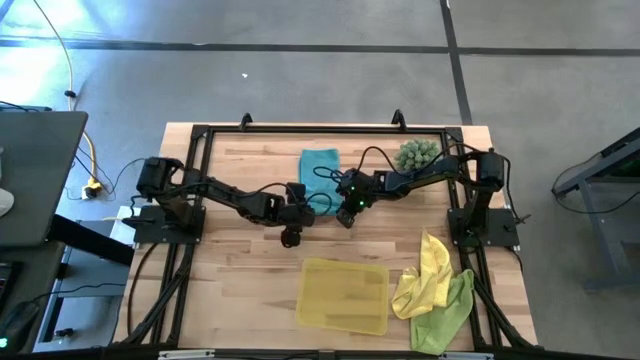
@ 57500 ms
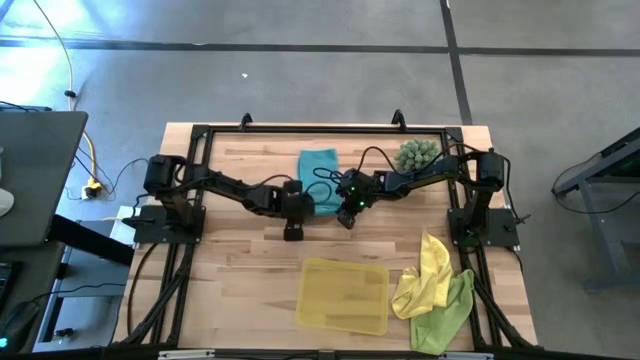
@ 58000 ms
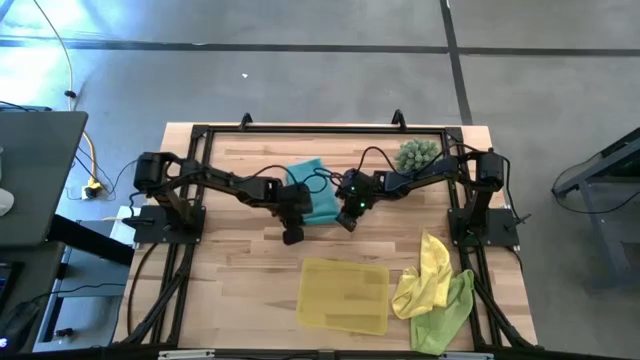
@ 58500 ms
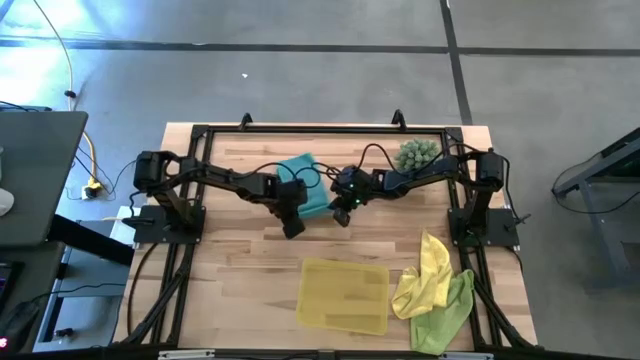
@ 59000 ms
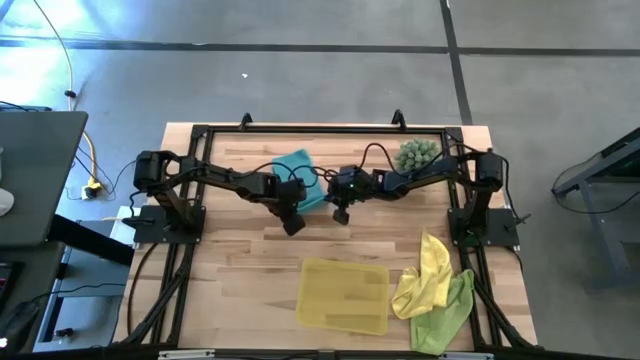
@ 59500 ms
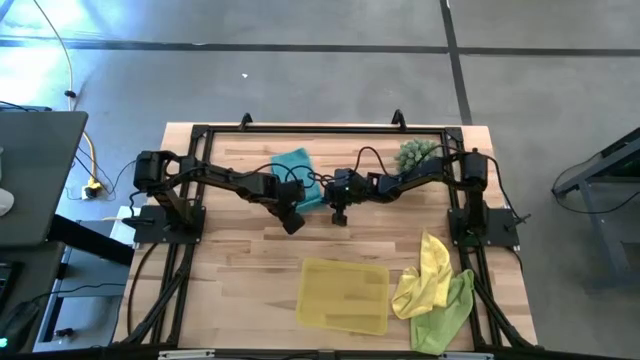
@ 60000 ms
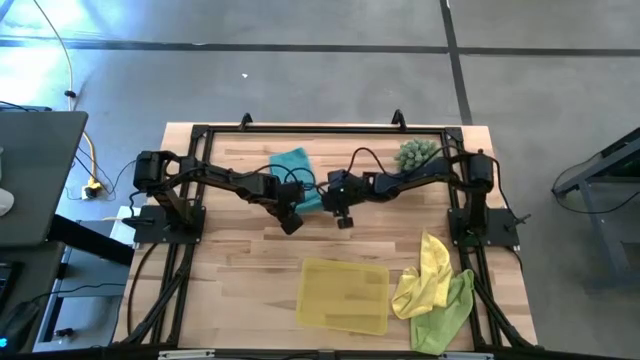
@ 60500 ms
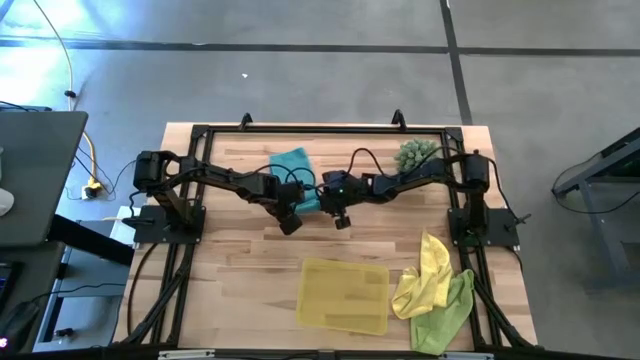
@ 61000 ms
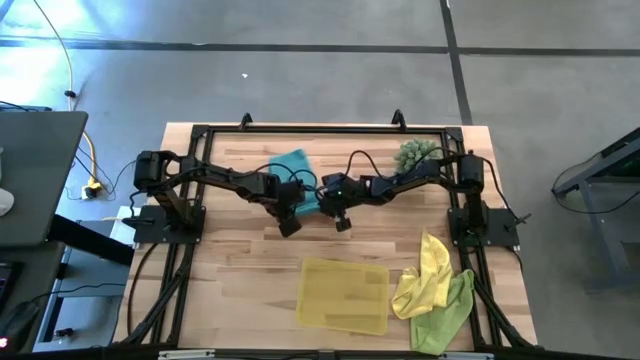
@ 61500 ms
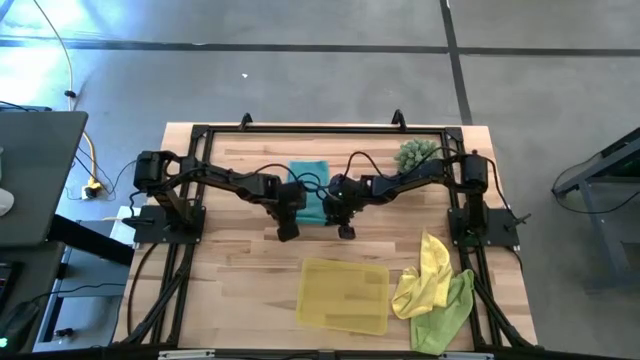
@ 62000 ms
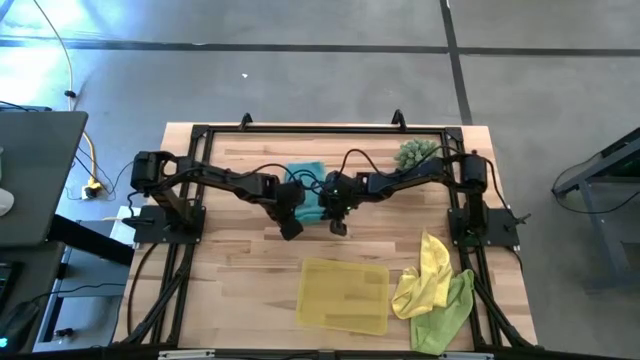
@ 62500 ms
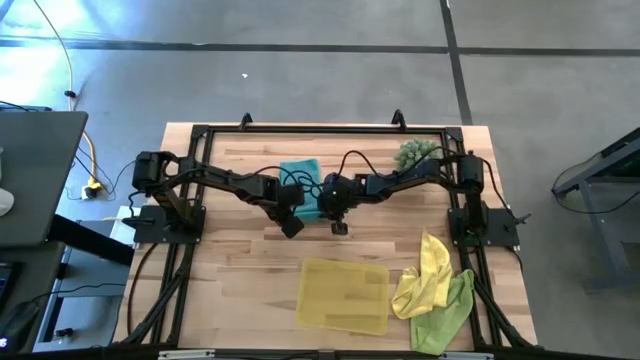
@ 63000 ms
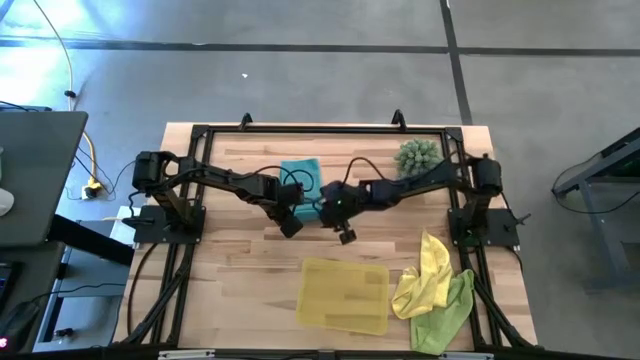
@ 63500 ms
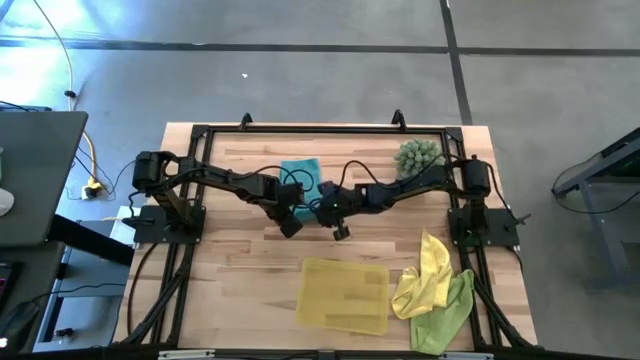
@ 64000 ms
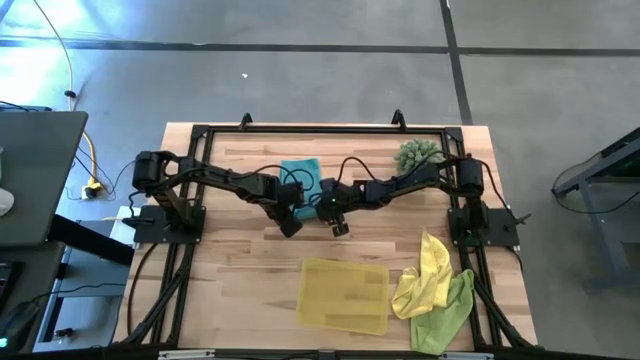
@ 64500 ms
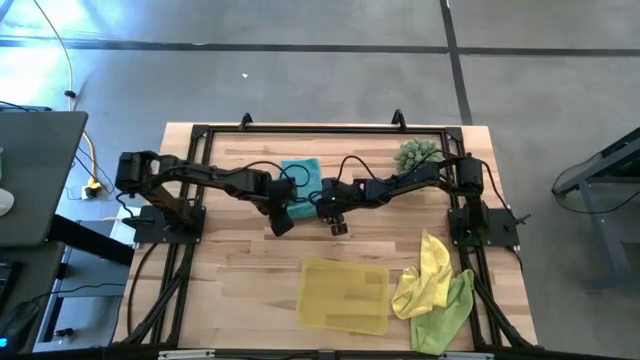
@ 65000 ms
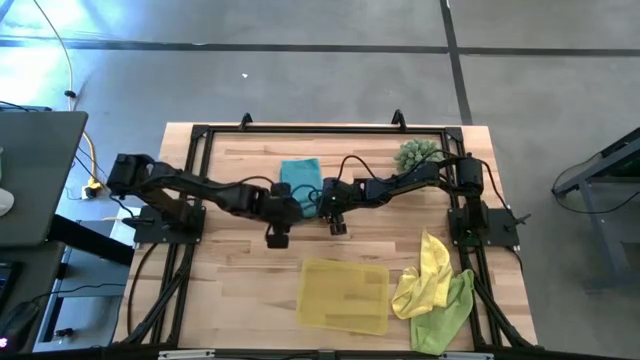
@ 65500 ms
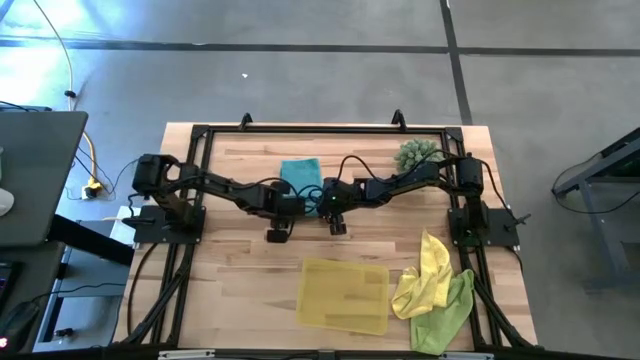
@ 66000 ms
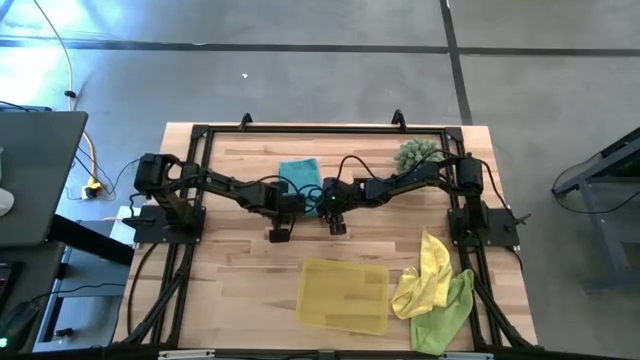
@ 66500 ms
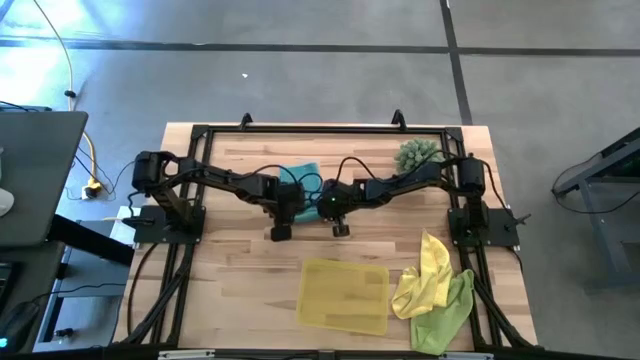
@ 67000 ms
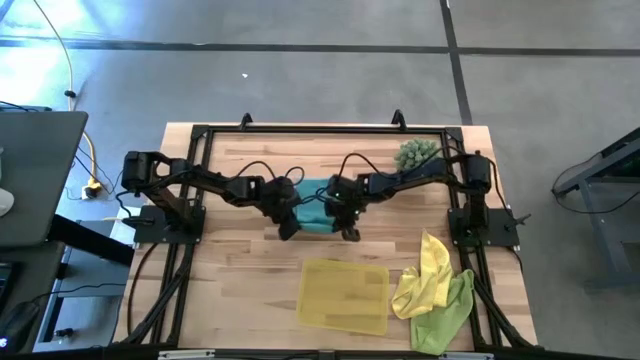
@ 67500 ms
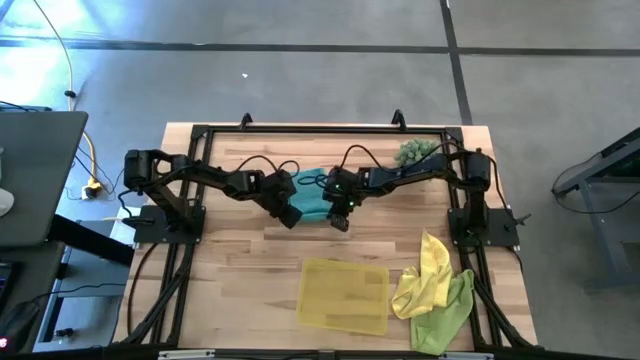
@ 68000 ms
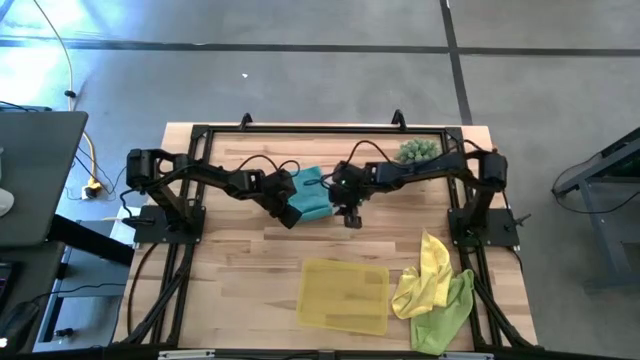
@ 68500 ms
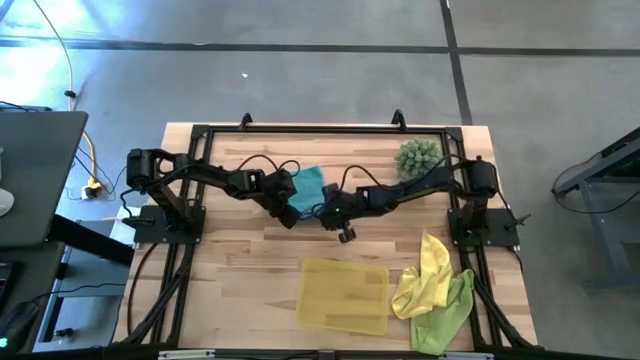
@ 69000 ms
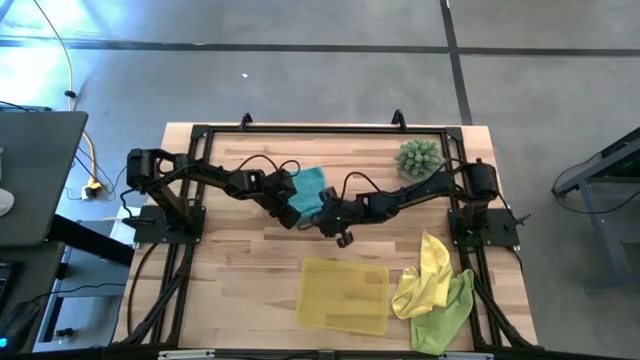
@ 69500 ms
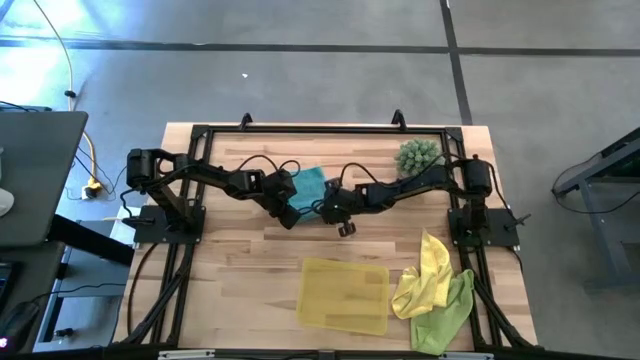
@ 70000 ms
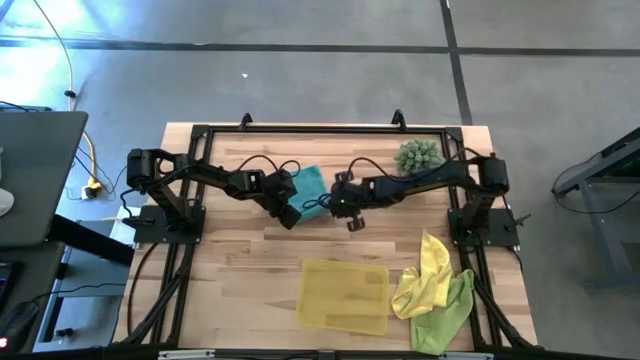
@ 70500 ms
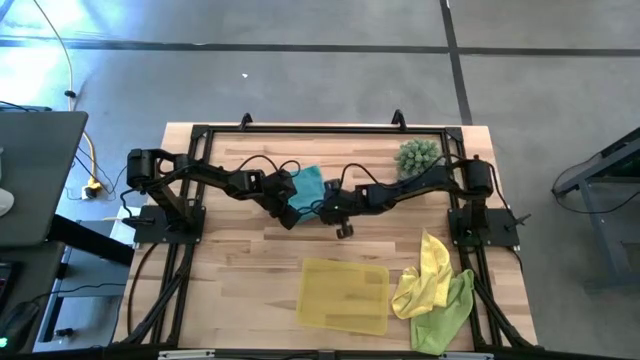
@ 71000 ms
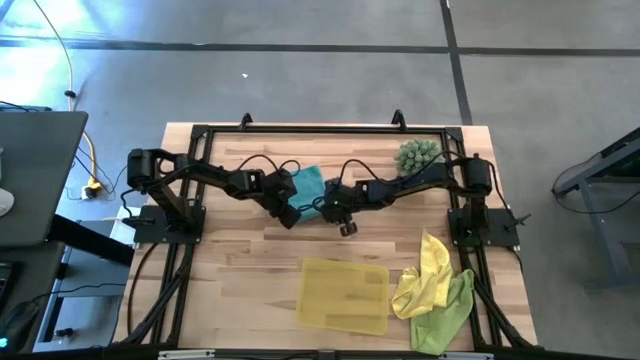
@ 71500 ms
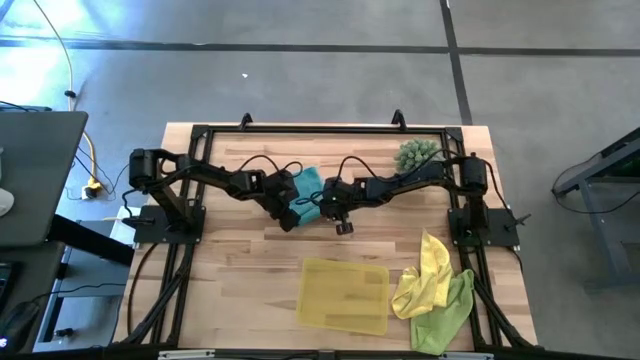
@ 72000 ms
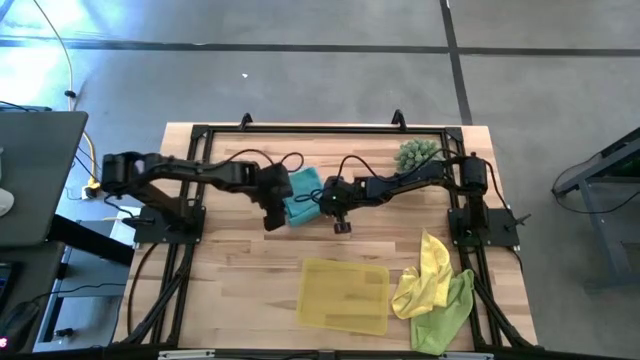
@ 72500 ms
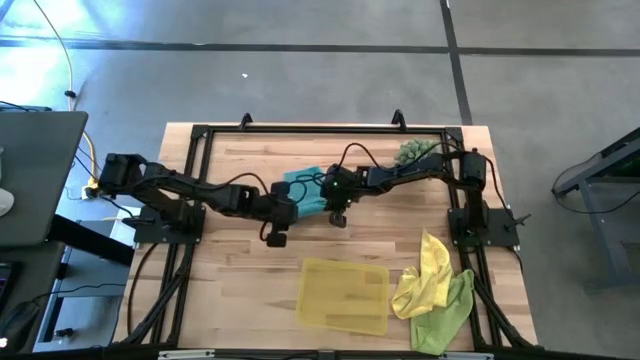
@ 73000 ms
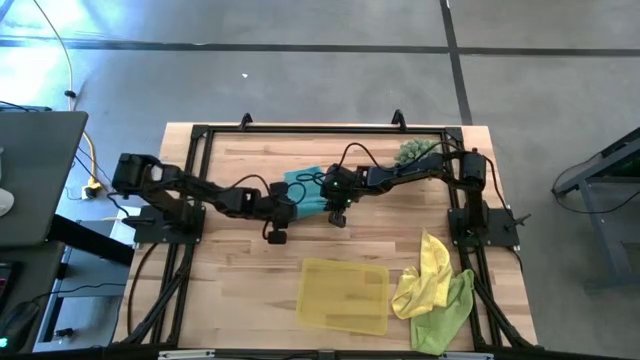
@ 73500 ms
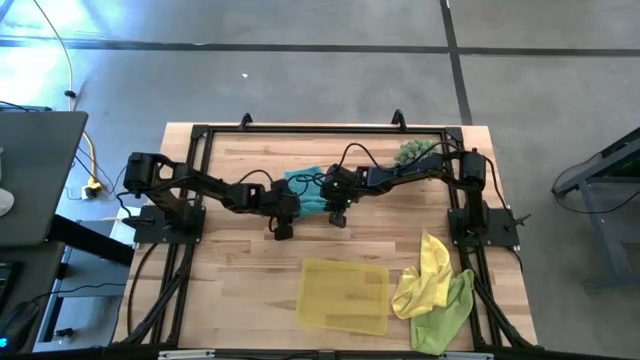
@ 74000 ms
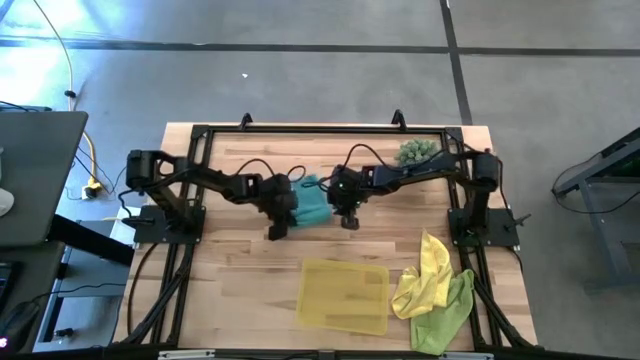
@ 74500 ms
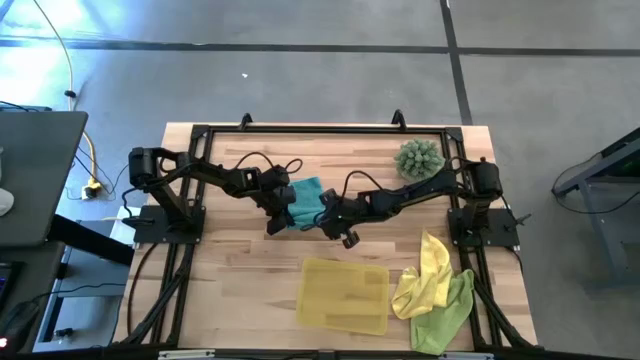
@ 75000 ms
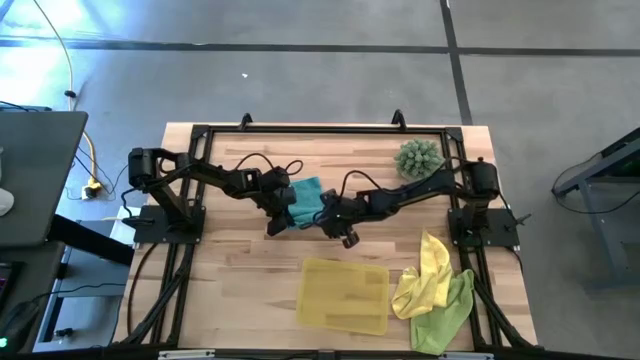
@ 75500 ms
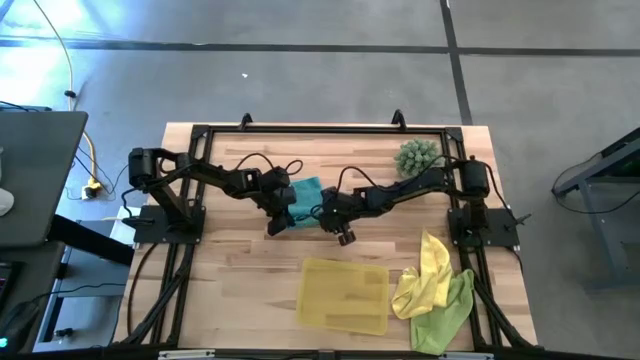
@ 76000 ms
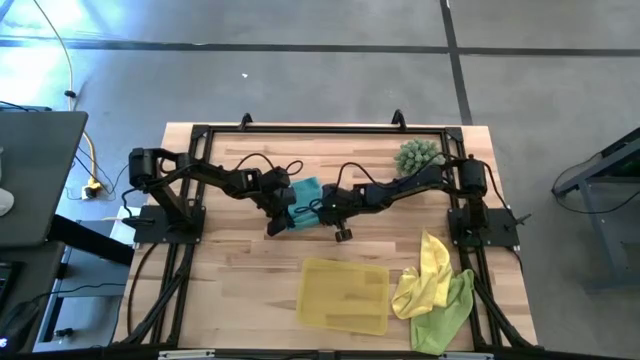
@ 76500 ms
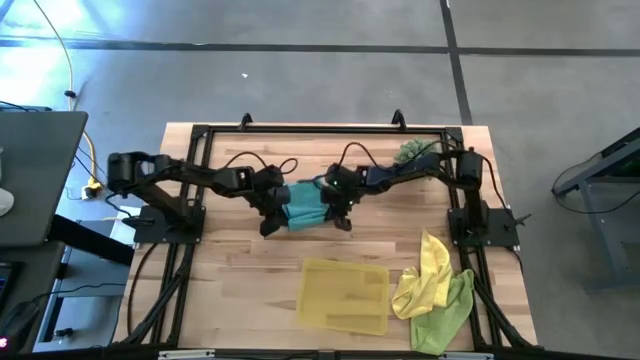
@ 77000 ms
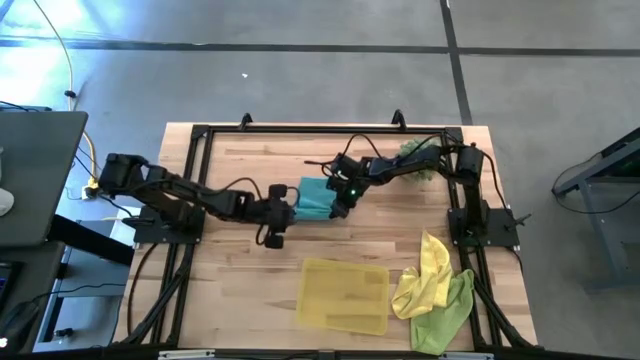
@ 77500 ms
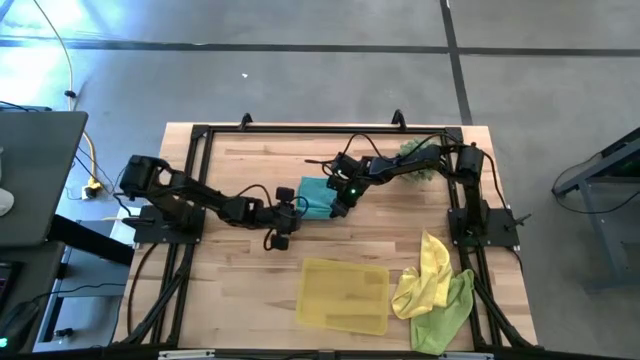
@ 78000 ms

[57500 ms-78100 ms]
Task: Roll microfiber towels into tight, uniform cylinder then place into a basket
Roll the blue towel

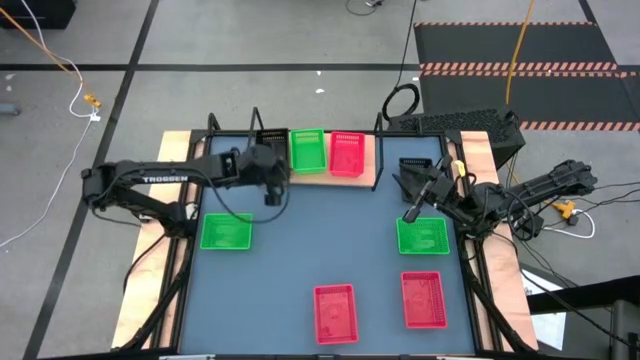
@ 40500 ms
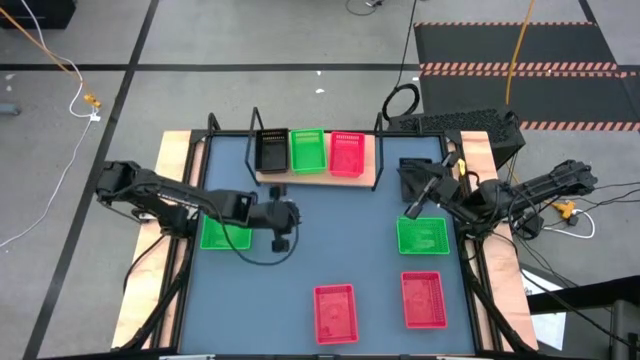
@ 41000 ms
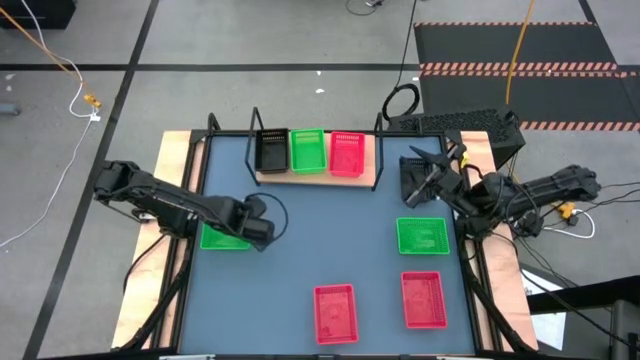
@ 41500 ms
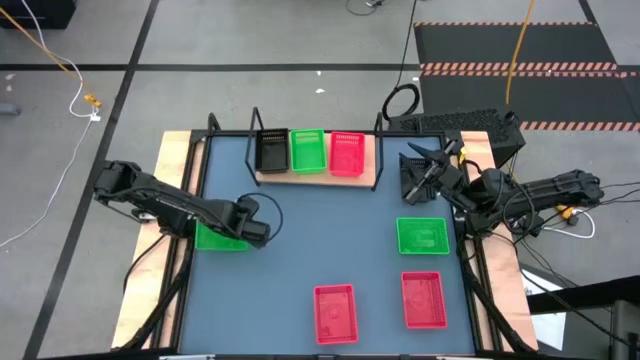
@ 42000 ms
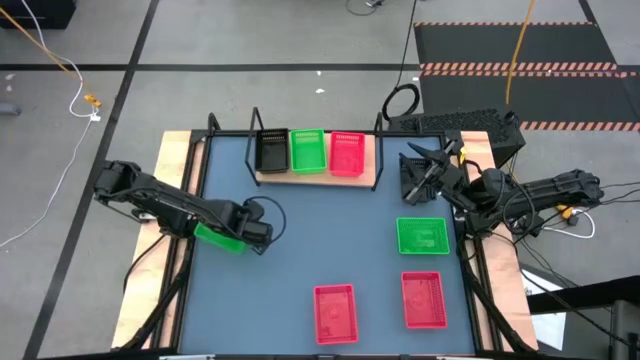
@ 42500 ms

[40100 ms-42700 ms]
Task: Stack baskets on shelf by color
Stack the left green bin on top of the green bin on the shelf
